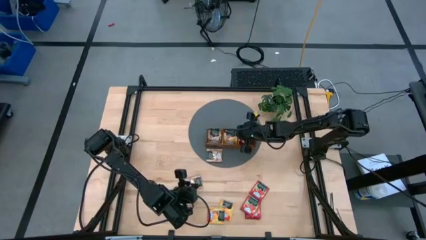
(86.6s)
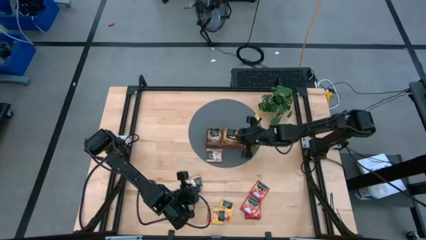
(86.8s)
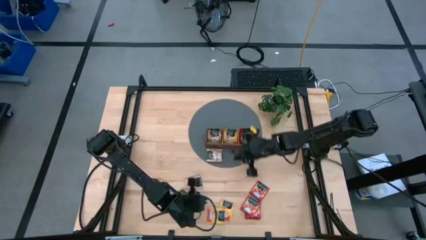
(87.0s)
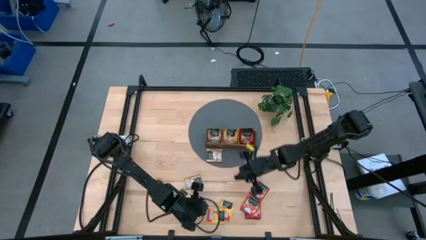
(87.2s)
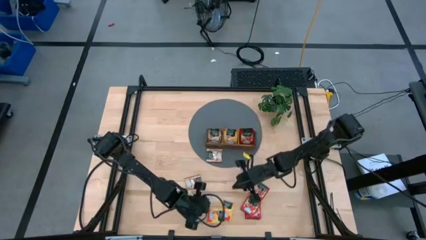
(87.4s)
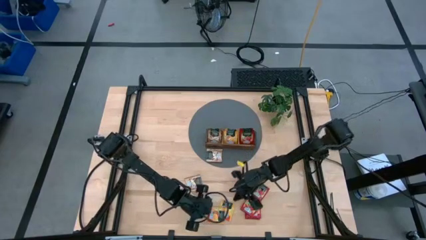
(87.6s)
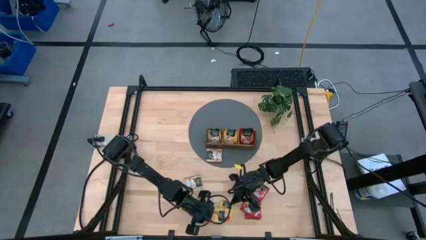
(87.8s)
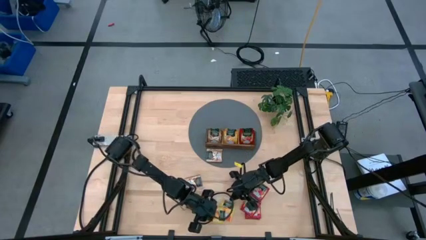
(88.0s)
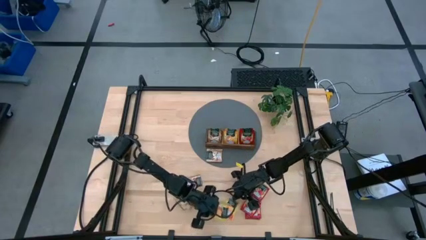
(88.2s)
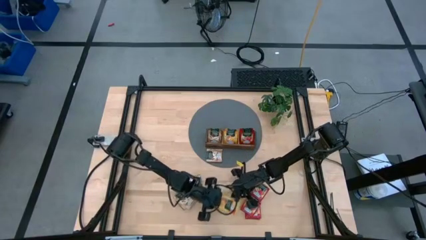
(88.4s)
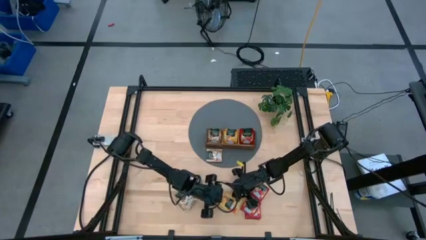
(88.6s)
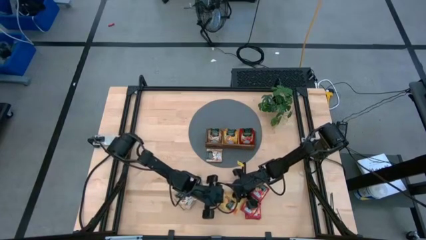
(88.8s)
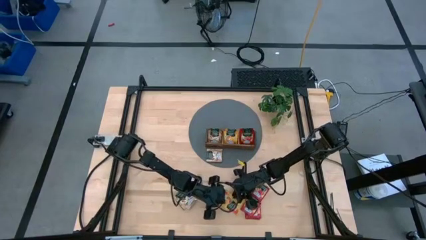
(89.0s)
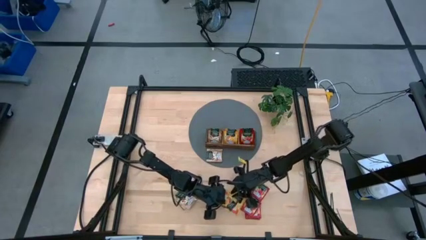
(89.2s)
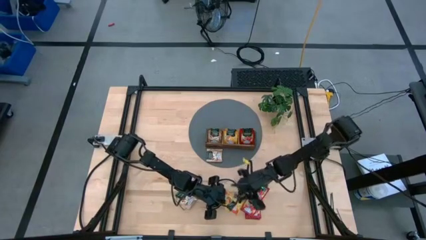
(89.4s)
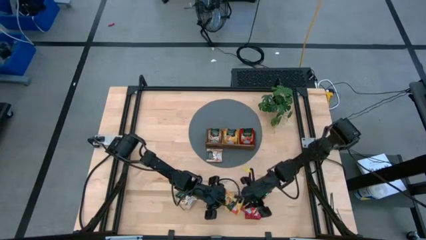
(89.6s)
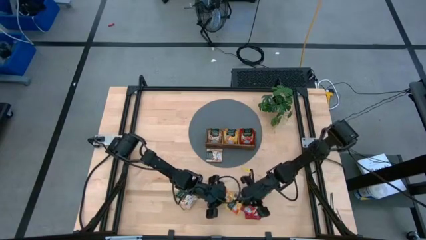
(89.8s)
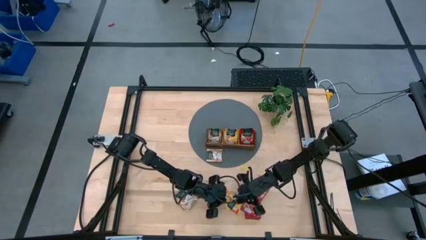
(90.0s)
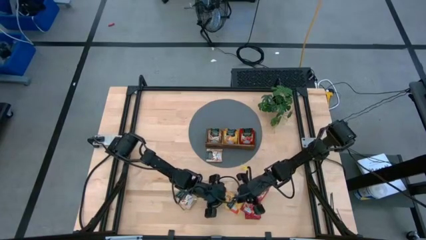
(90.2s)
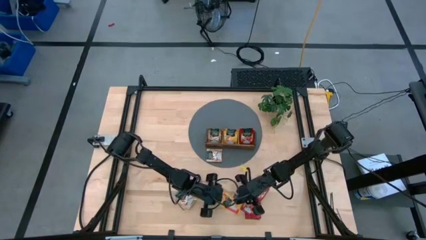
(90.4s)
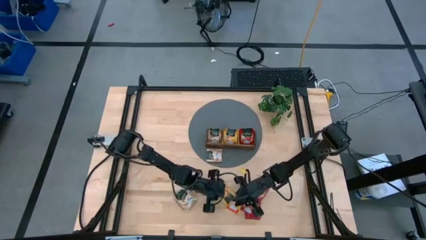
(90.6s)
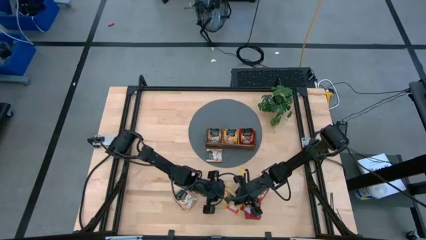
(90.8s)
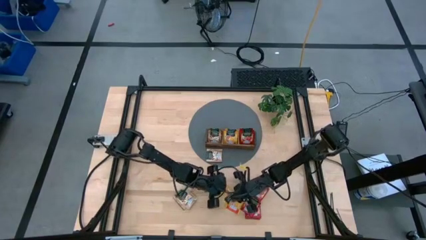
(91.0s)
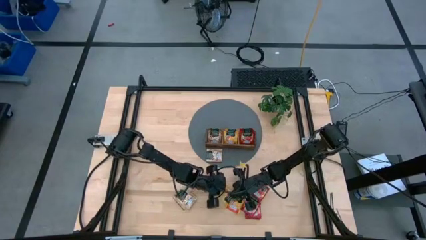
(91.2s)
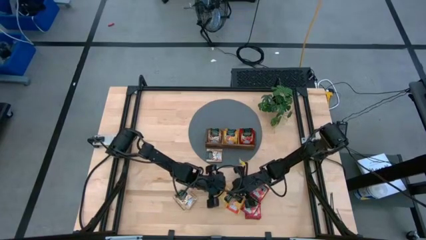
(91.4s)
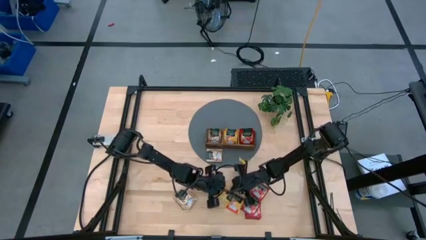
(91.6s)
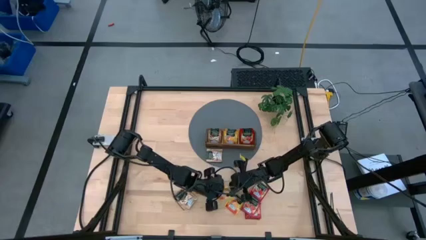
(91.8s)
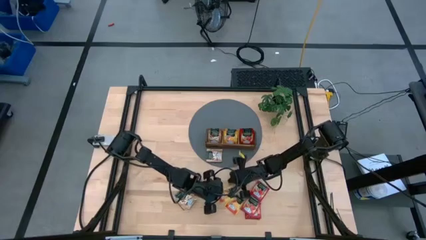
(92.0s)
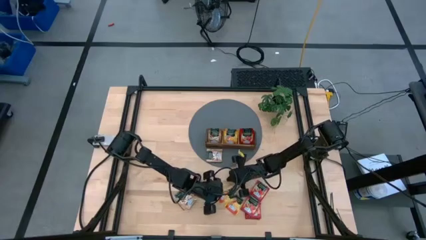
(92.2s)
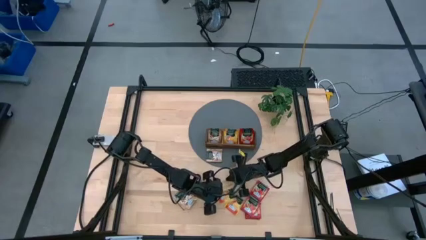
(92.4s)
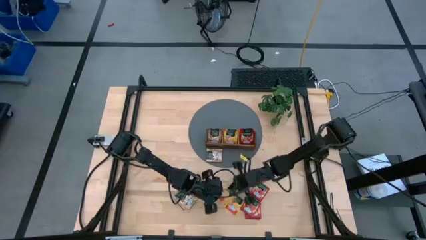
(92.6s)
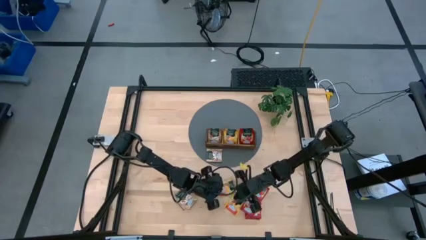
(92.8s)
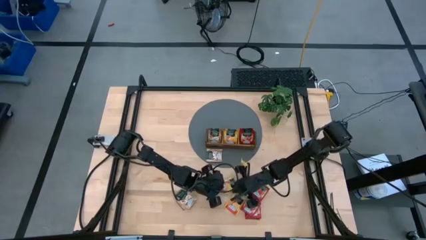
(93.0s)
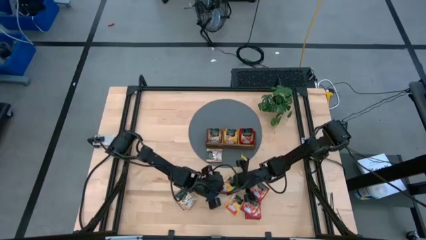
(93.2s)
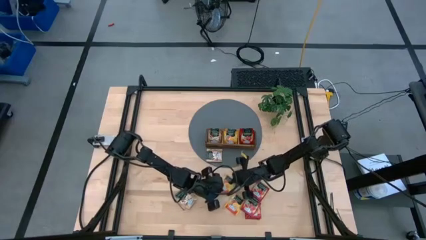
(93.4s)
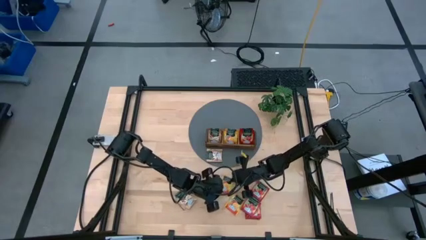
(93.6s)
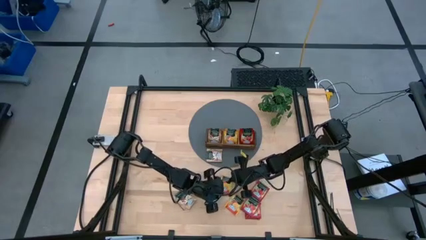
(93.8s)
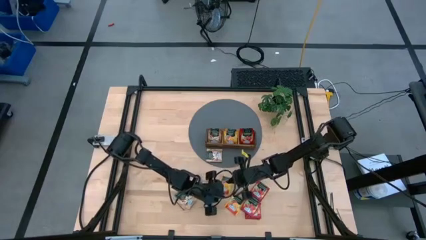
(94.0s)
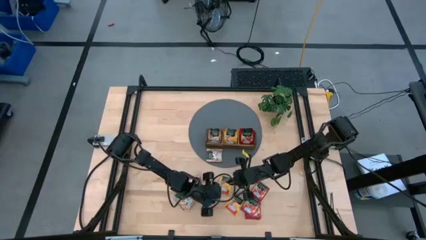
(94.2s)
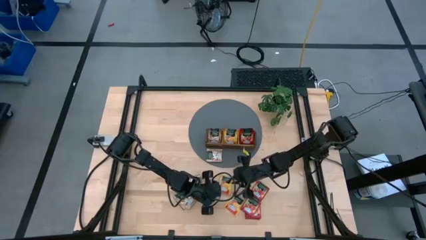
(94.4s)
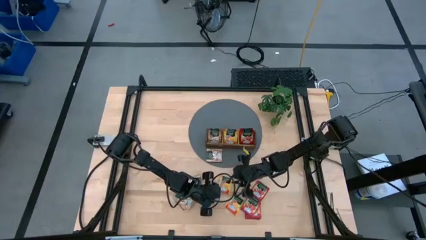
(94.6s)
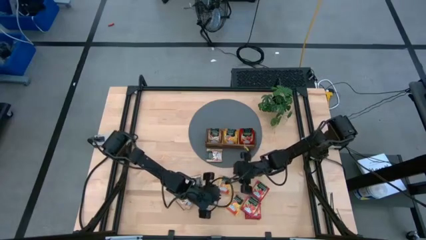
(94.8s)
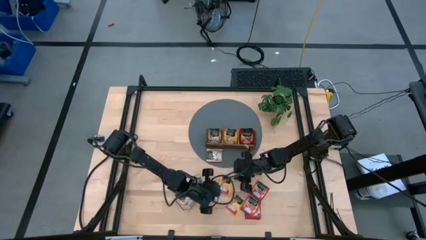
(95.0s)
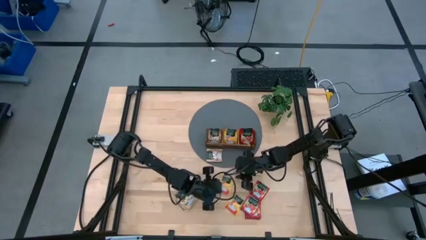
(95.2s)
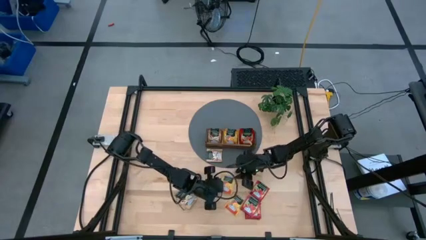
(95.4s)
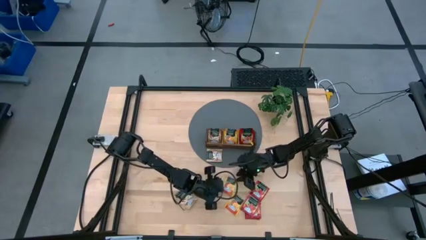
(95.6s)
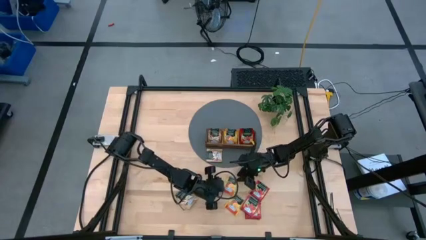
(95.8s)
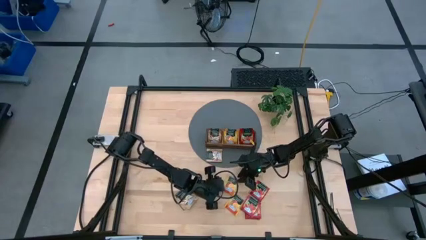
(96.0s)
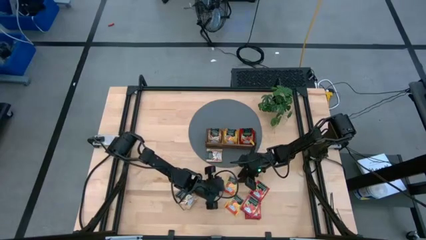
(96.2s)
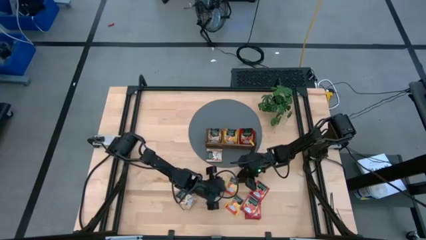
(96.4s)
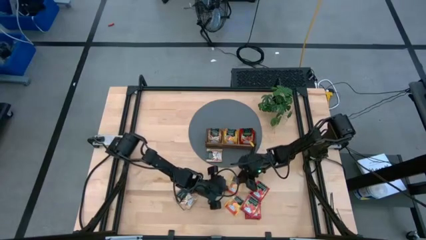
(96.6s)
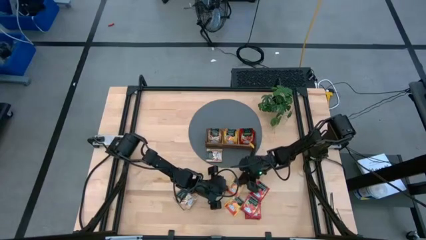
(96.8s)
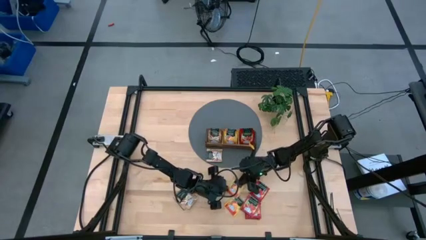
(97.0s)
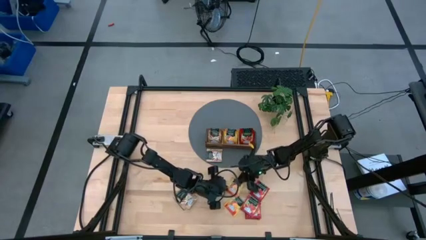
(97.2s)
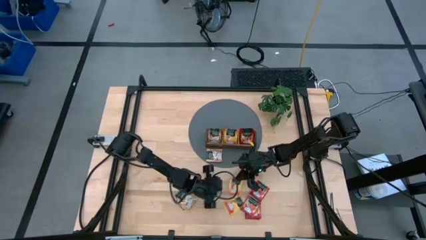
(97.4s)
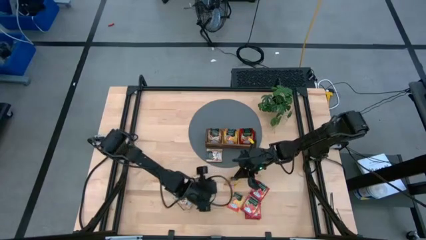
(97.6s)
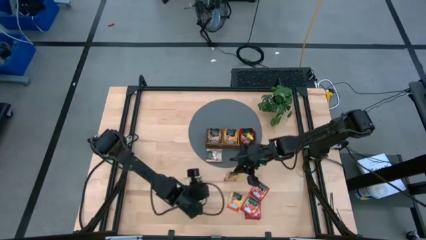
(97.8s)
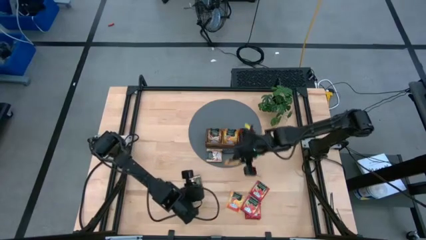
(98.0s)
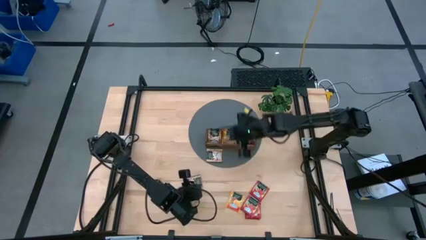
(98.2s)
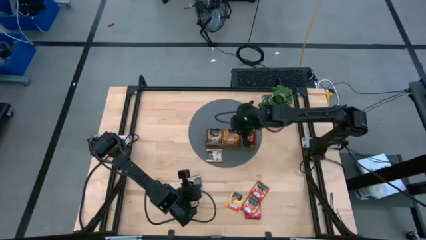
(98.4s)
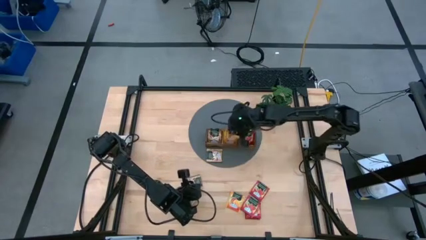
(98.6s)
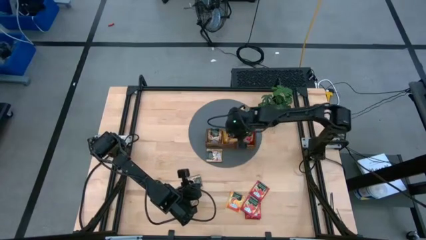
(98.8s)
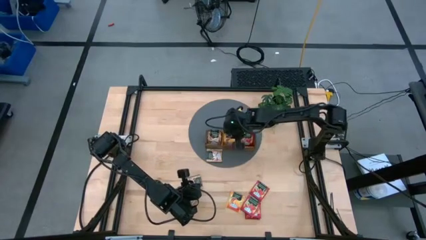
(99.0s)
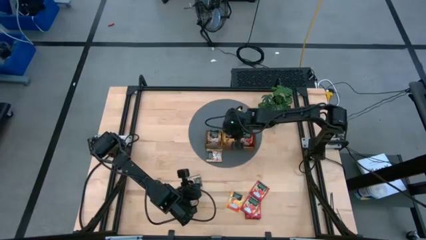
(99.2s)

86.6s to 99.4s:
Task: Pick & Place Tea
Put the left orange tea packet into the middle section of the wooden organizer
